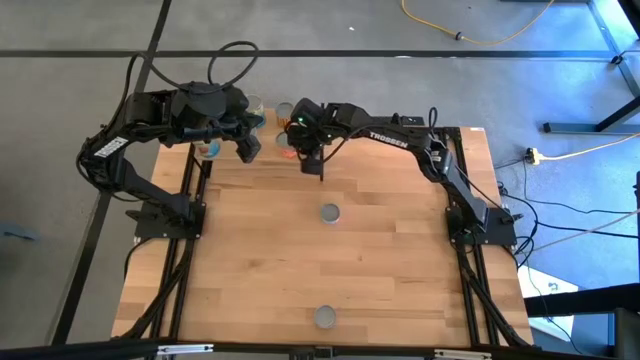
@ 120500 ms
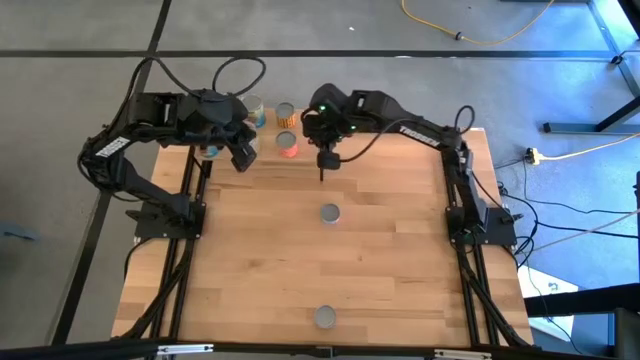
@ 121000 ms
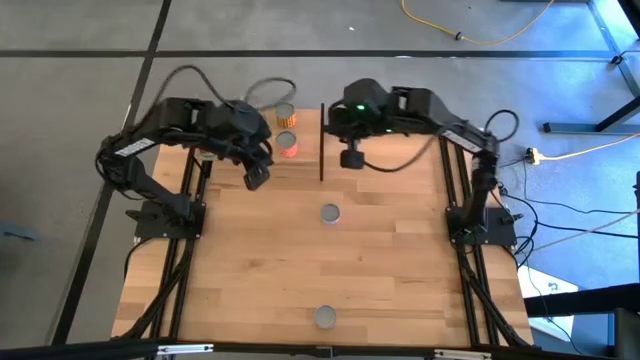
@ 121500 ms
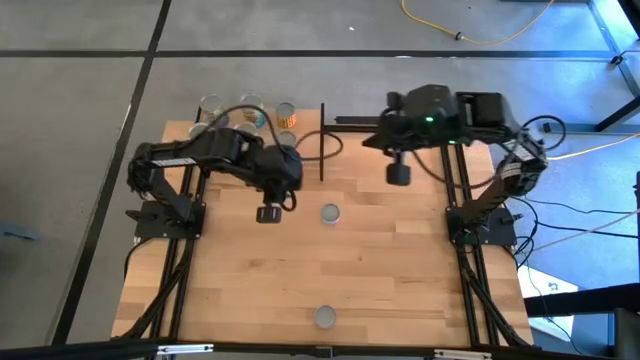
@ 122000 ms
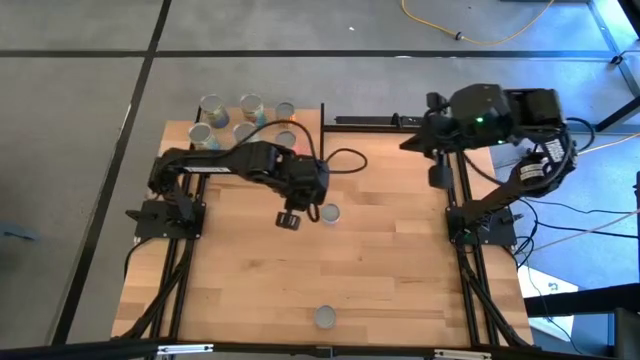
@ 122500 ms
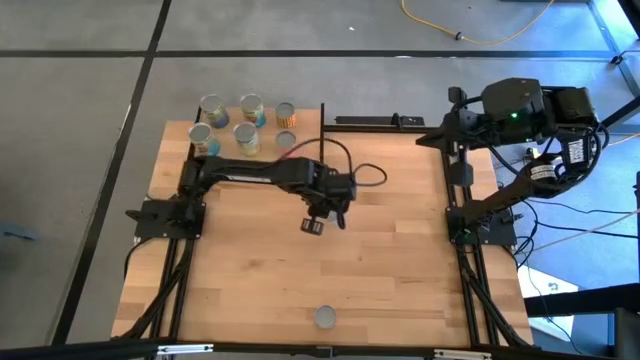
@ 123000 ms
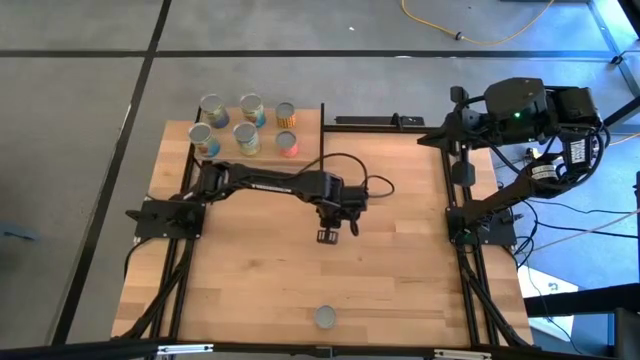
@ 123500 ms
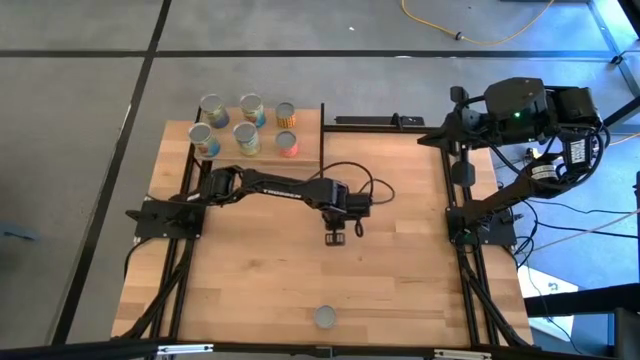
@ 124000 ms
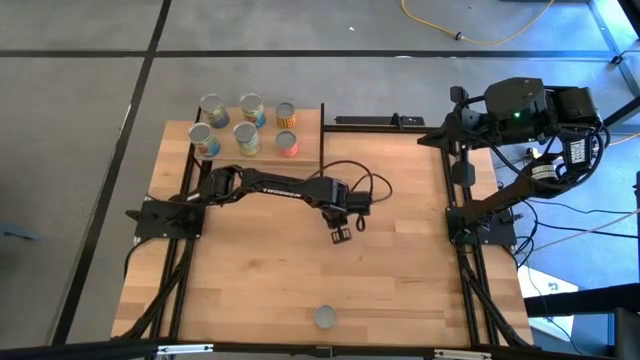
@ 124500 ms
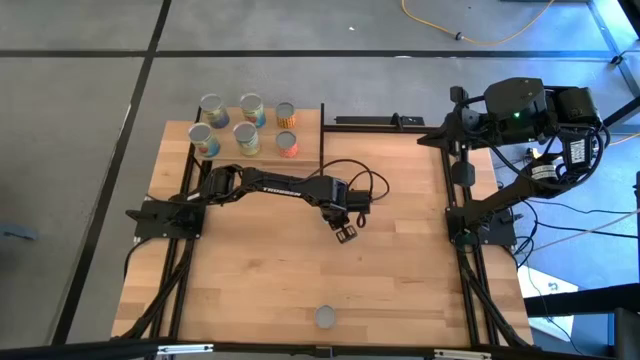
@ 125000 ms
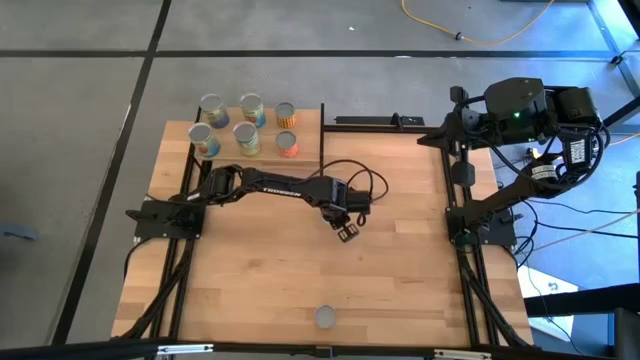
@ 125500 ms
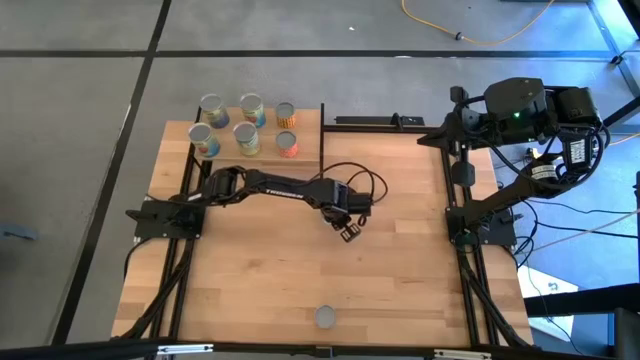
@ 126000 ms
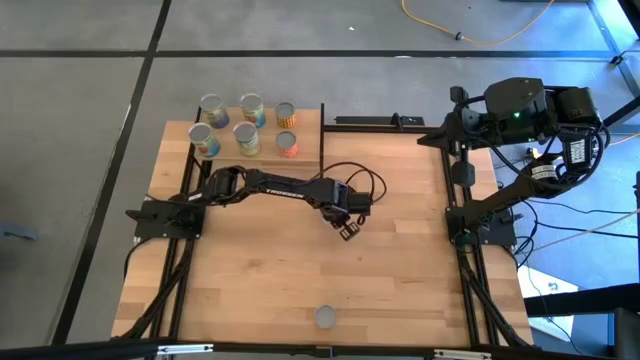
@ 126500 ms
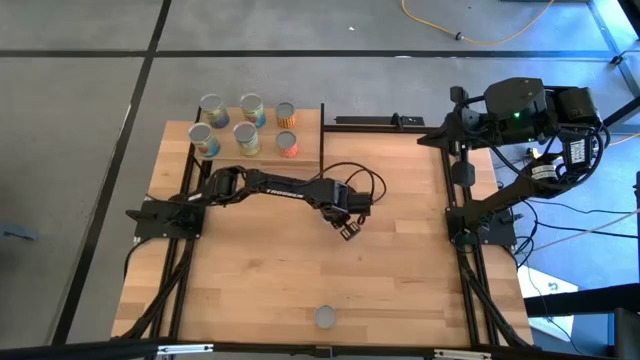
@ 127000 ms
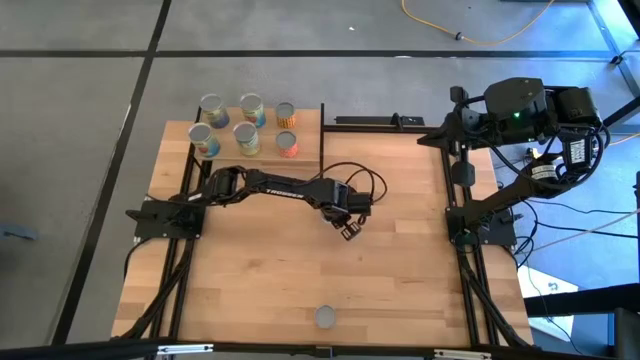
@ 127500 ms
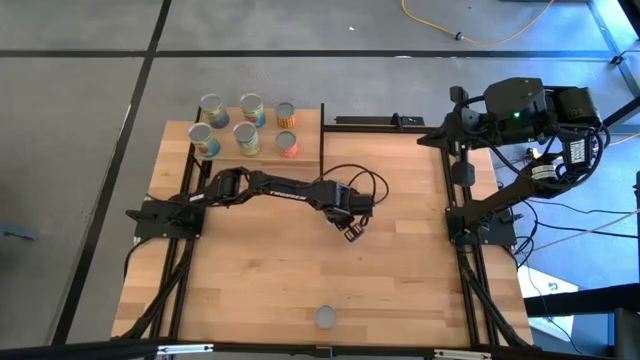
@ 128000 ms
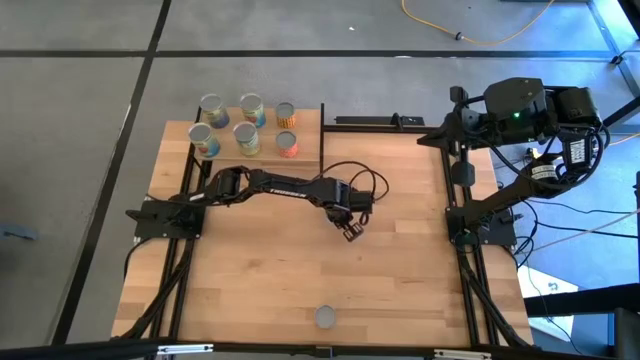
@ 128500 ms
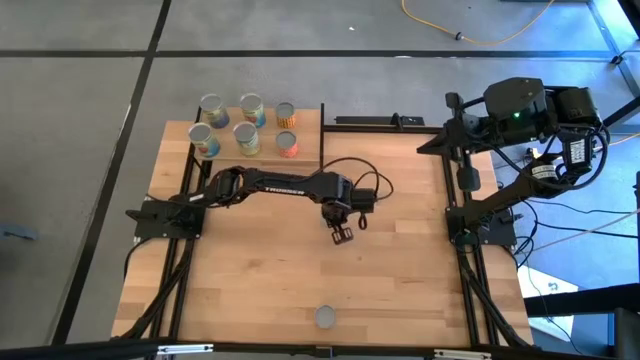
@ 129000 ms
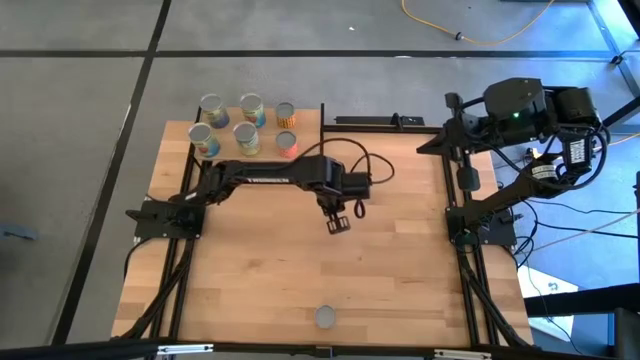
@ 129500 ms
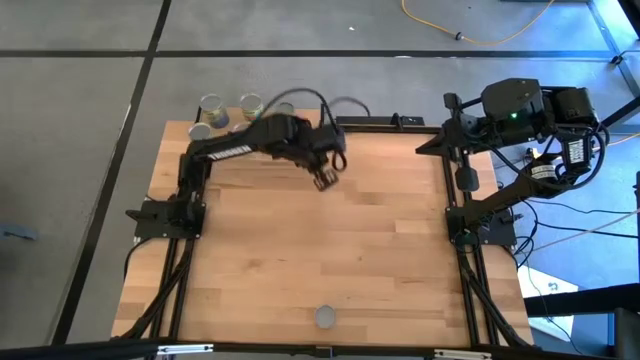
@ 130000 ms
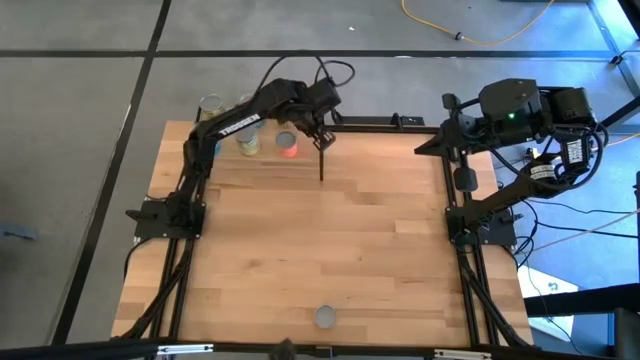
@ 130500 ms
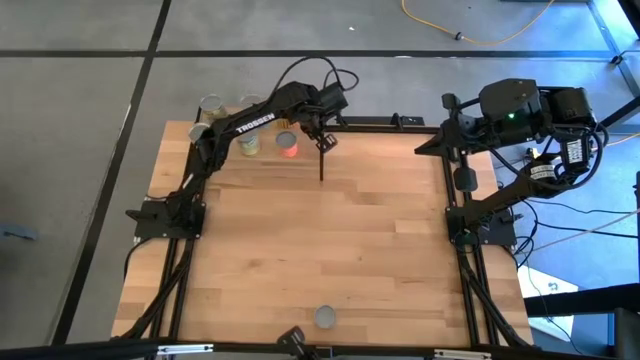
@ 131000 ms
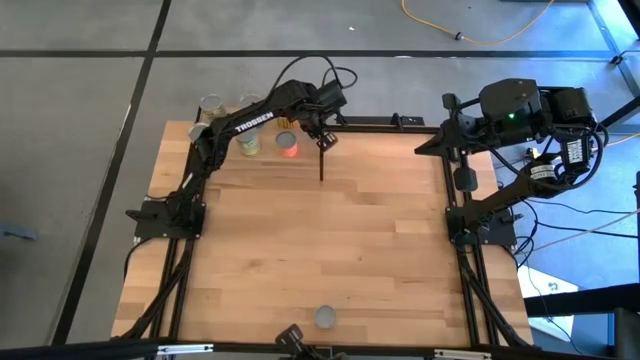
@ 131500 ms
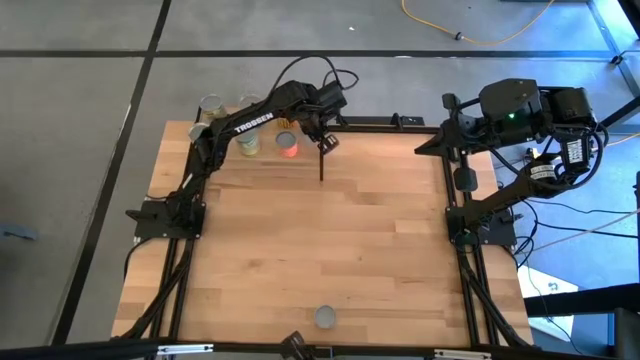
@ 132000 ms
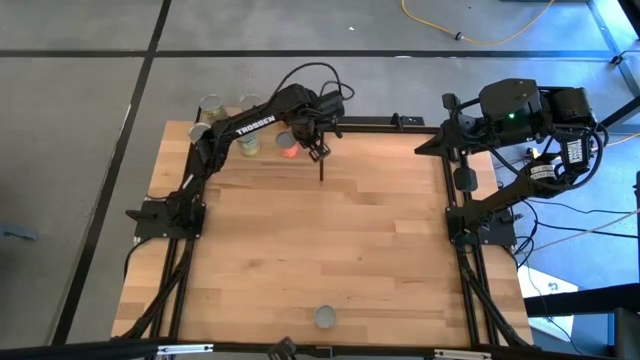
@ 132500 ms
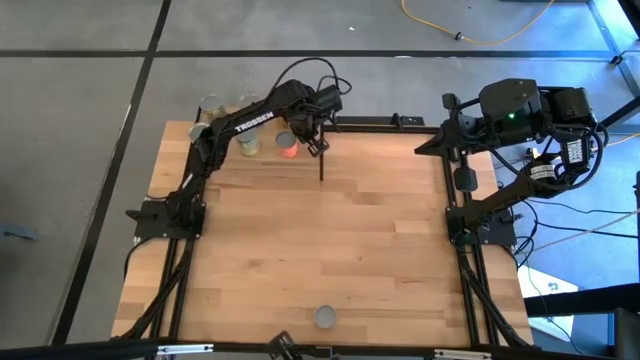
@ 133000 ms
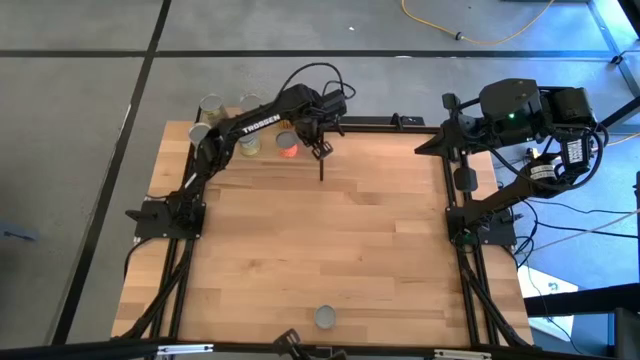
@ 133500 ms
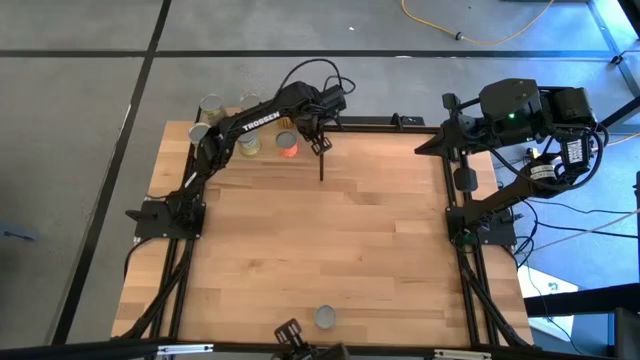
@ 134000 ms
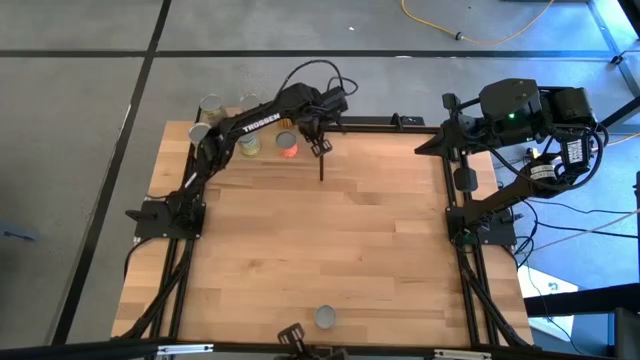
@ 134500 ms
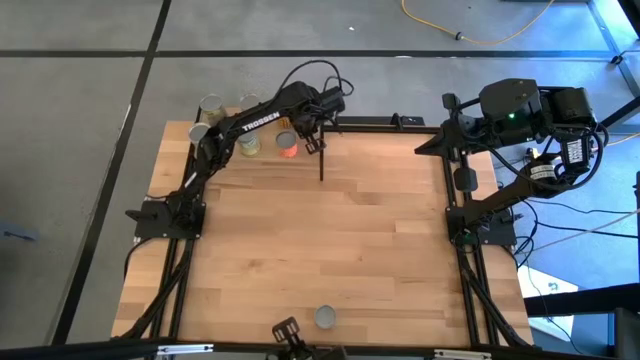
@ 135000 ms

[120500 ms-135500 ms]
Task: Pick and place cans onto a shelf
Put the blue tuna can on the shelf

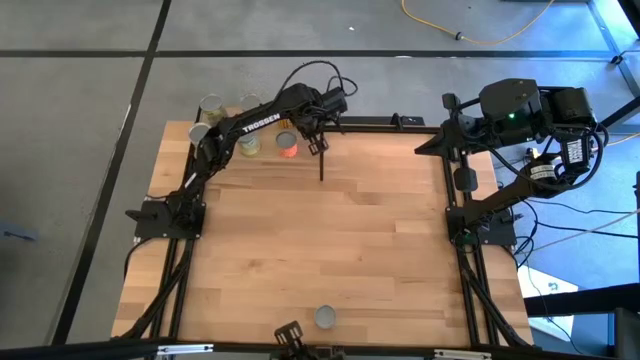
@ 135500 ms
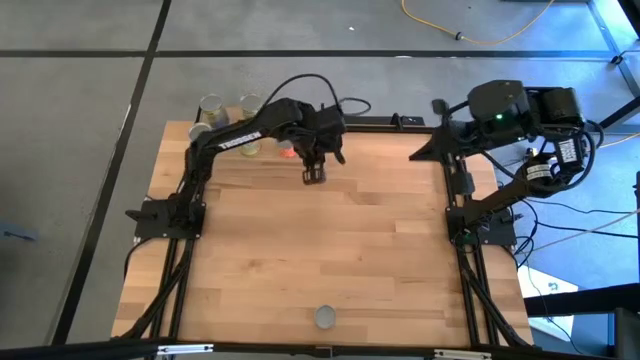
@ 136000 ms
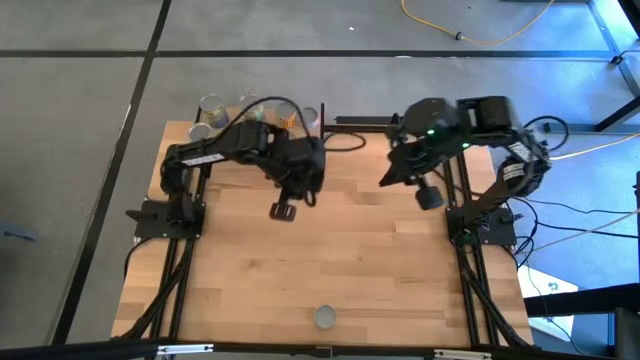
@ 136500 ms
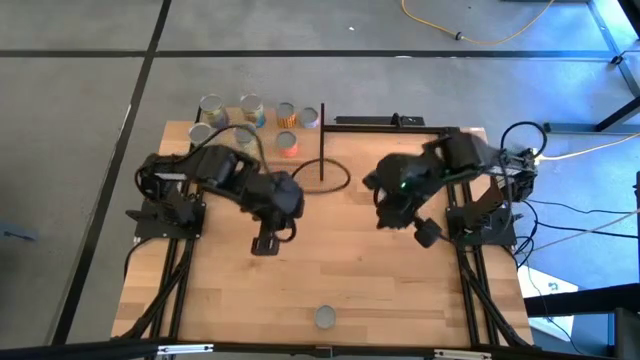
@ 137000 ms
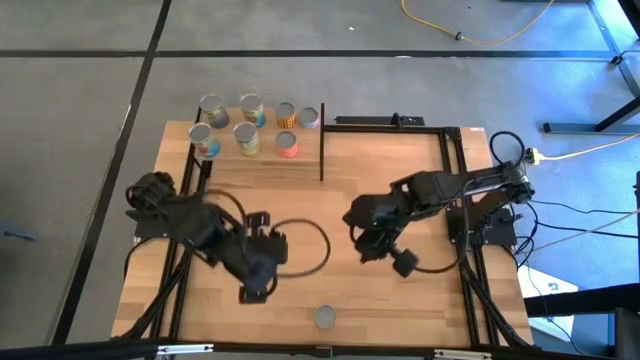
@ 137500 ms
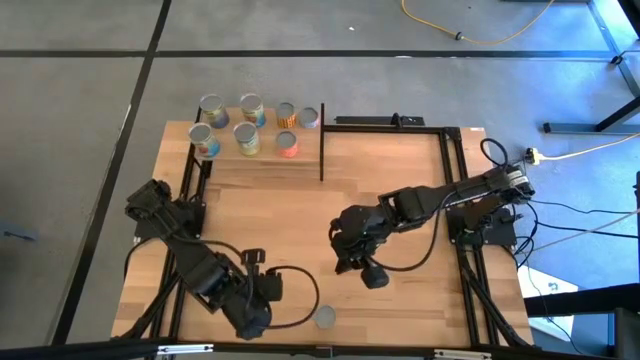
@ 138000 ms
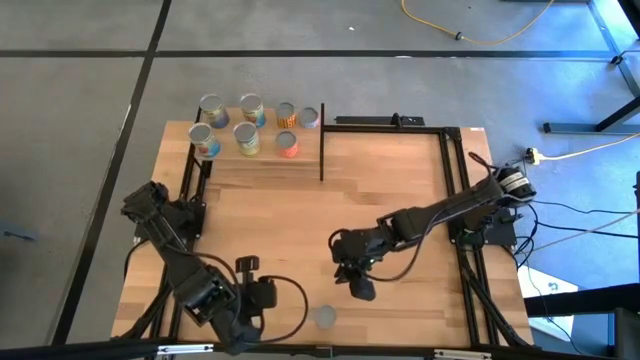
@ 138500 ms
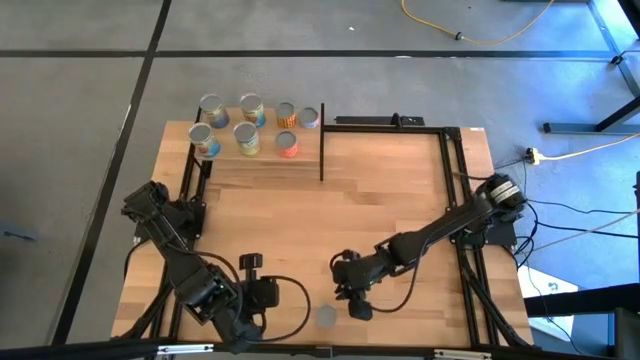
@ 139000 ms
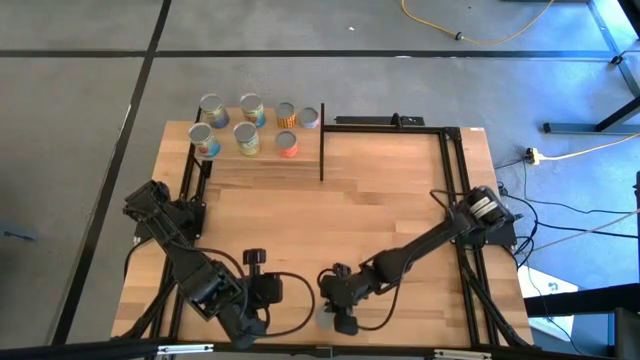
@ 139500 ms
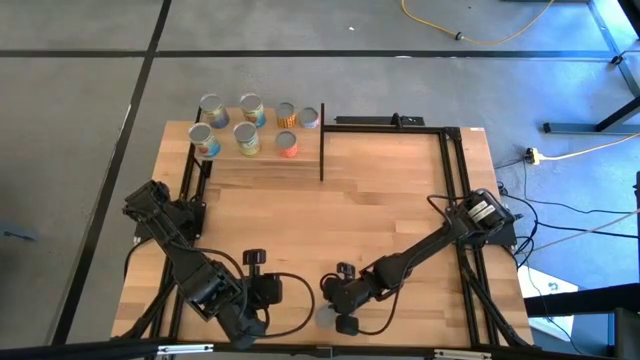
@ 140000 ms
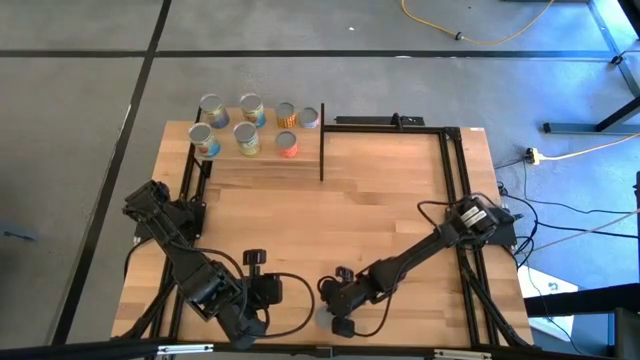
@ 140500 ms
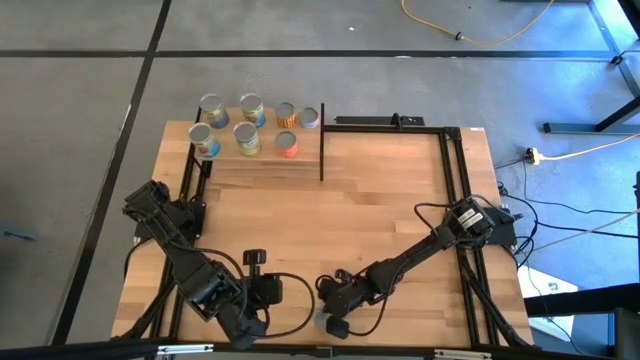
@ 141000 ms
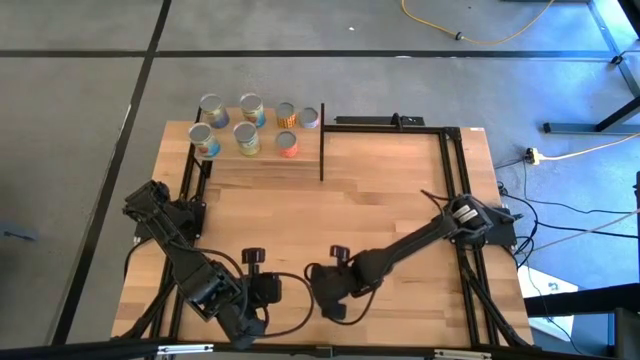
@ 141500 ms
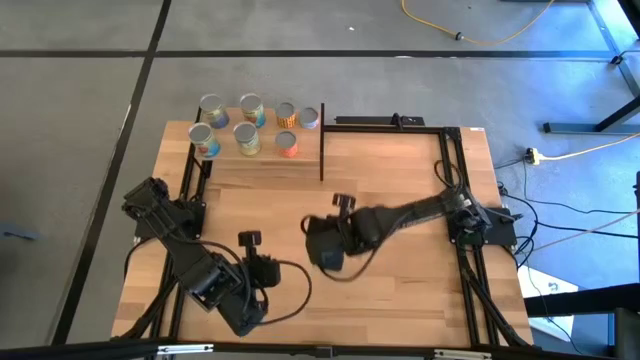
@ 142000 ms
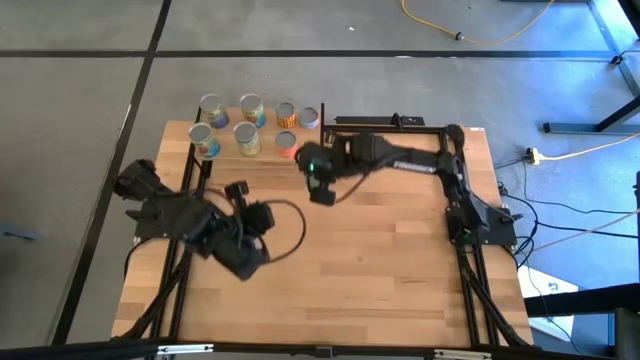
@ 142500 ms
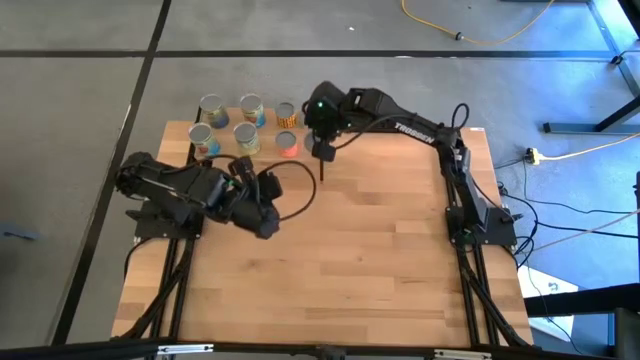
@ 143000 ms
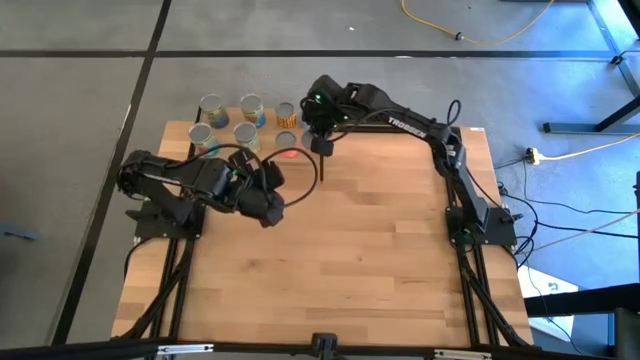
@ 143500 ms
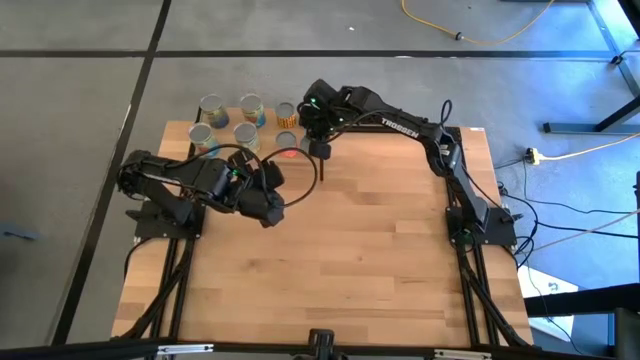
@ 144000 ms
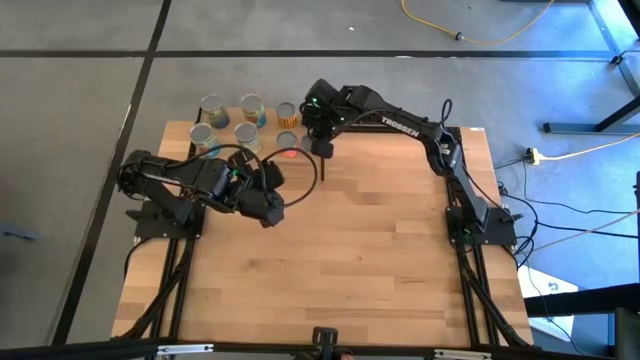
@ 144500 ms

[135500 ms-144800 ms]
Put the yellow canned pineapple rings on the shelf aligned with the other blue tuna can
